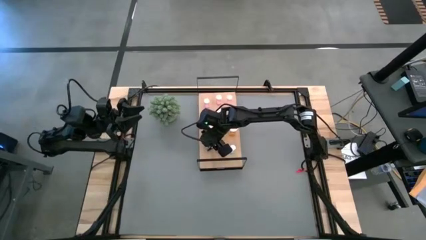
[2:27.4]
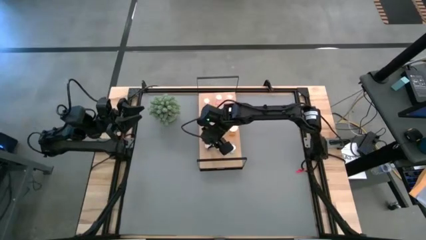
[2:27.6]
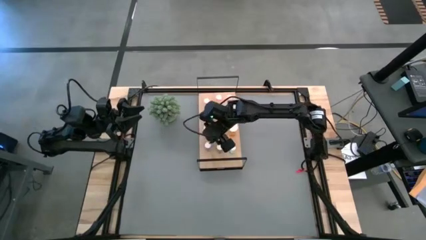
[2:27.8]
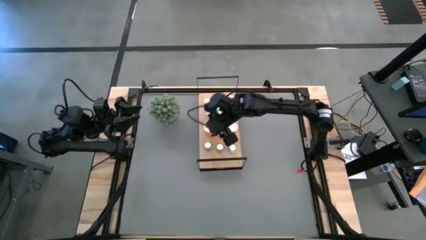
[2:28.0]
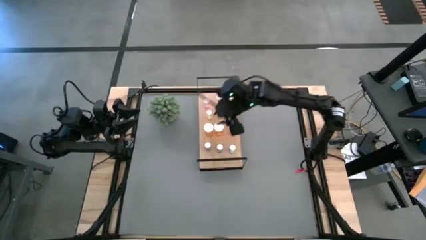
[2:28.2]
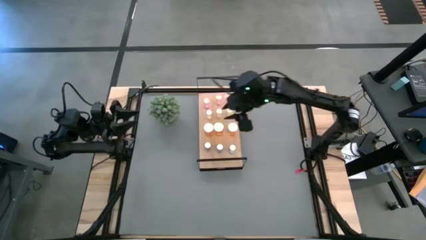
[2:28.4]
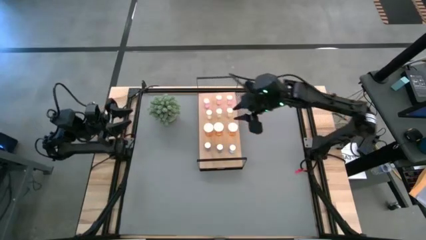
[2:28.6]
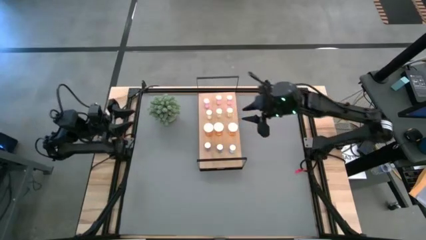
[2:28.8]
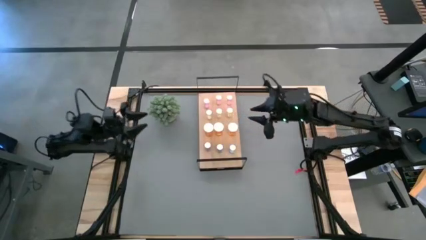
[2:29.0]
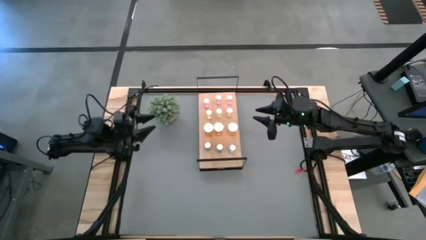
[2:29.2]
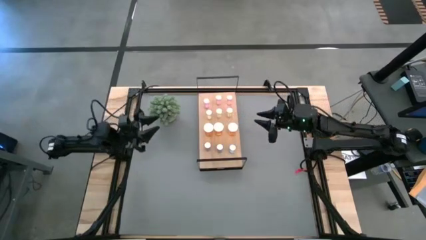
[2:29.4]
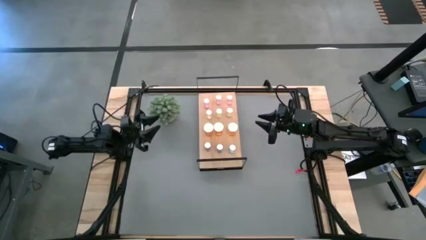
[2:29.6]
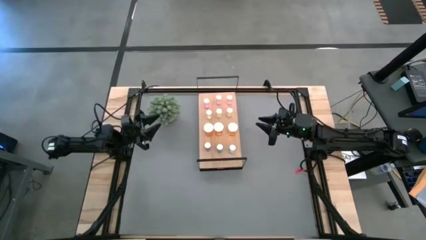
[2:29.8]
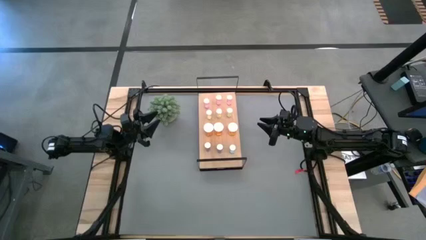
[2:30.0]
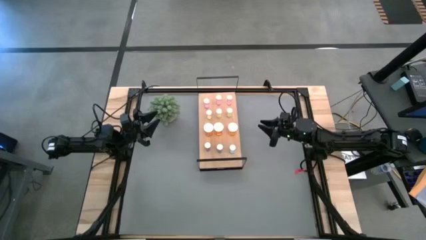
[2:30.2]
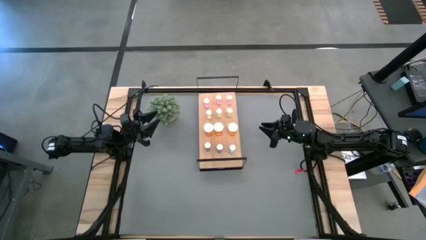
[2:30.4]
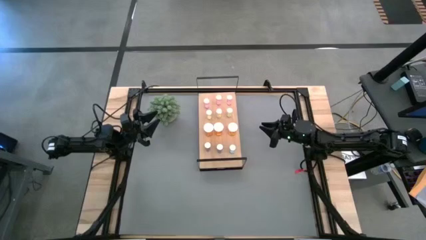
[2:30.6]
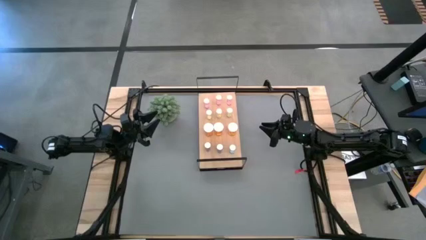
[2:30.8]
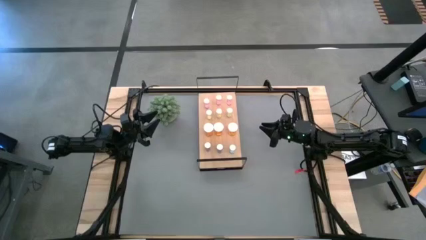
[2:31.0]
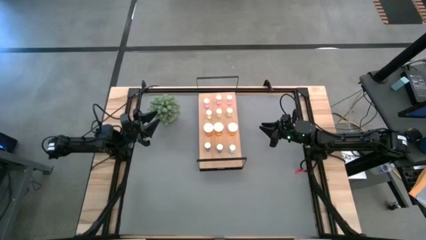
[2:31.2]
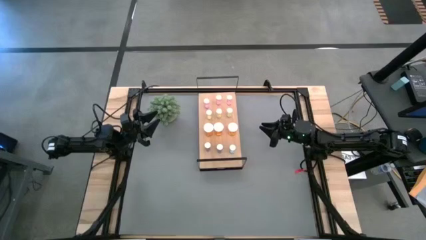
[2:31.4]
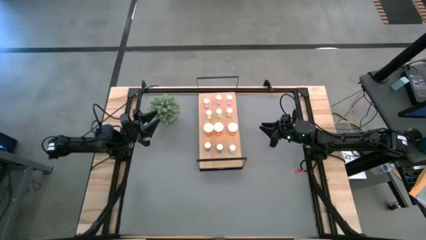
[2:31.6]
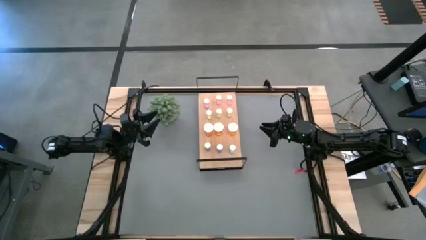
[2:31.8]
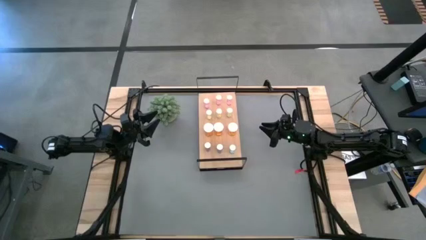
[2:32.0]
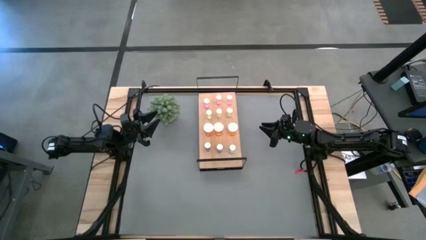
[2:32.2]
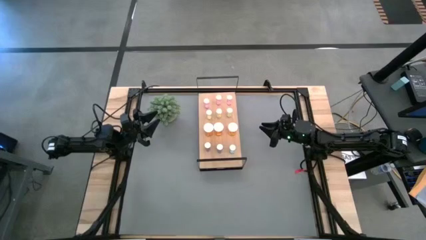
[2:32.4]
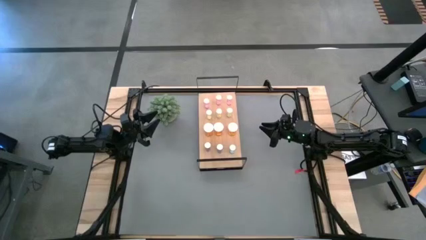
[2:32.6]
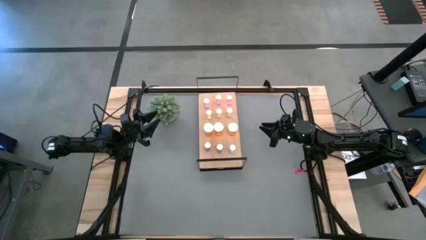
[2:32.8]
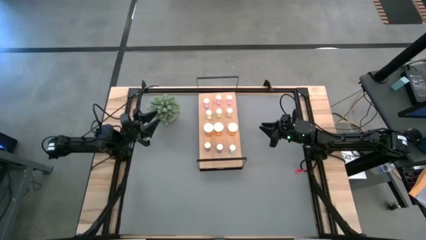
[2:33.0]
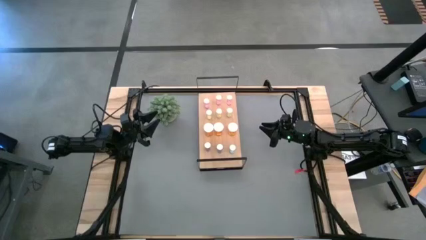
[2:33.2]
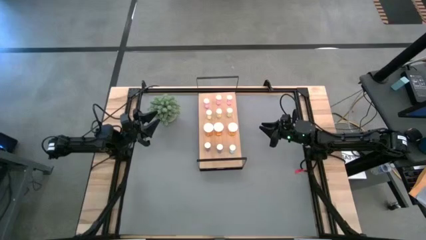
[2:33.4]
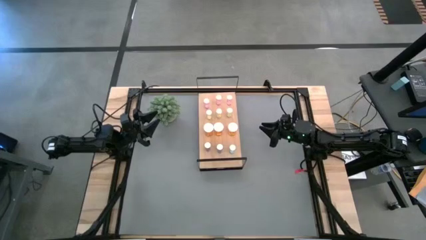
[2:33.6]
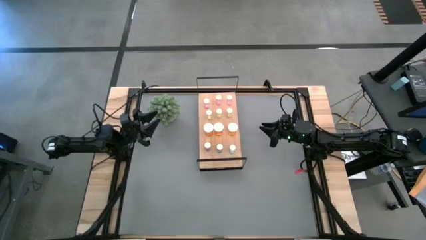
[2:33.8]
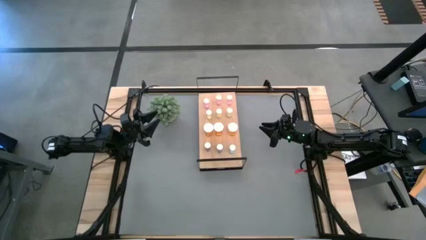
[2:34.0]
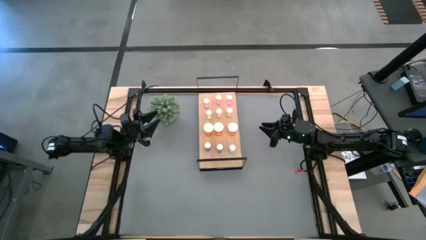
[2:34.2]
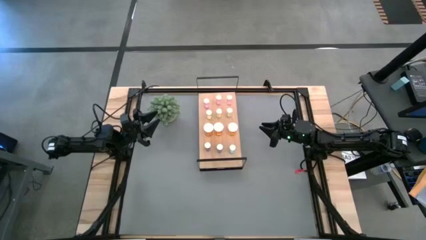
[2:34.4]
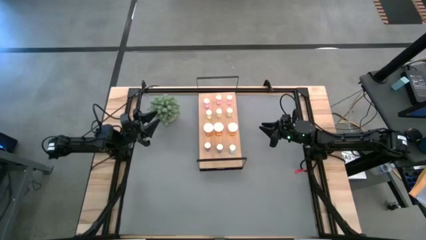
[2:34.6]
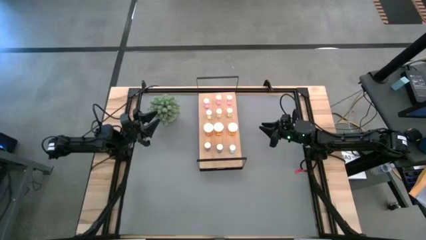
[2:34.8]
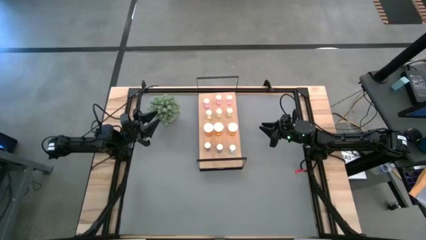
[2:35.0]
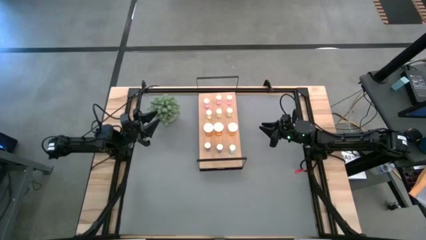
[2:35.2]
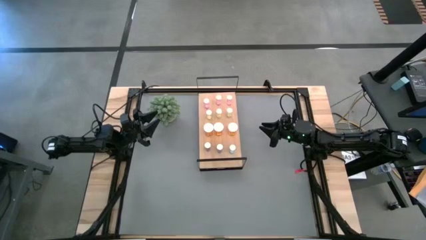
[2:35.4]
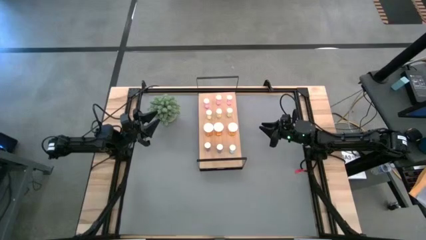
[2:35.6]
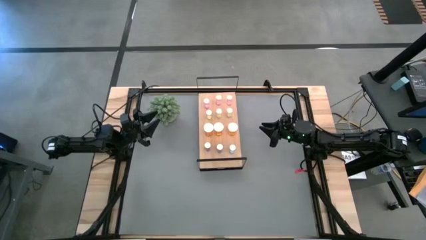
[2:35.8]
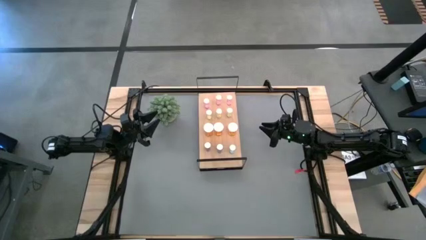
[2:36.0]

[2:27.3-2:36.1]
Task: Pick and place medicine bottles onto shelf by color
Return to Home Position

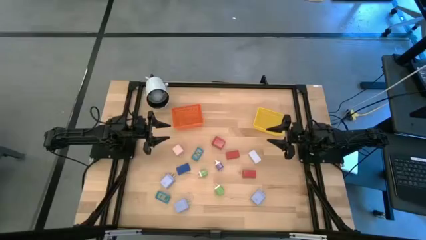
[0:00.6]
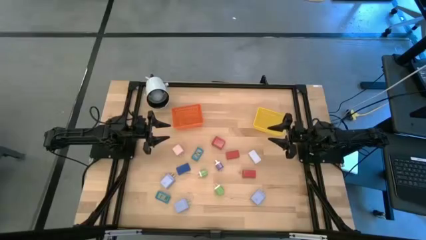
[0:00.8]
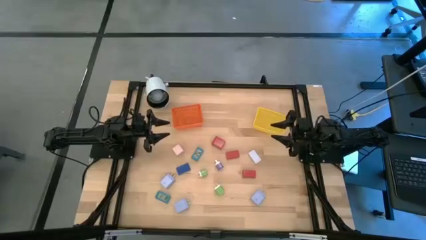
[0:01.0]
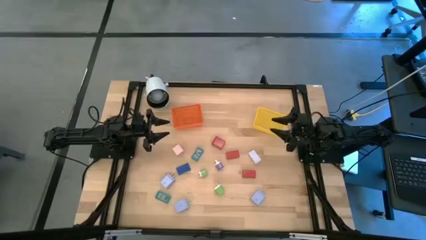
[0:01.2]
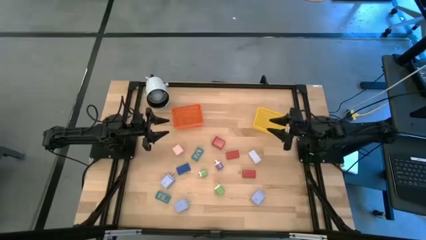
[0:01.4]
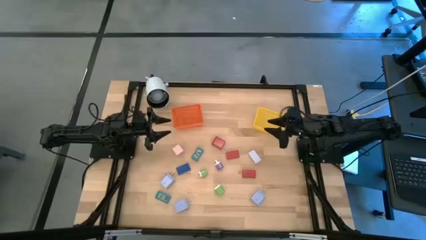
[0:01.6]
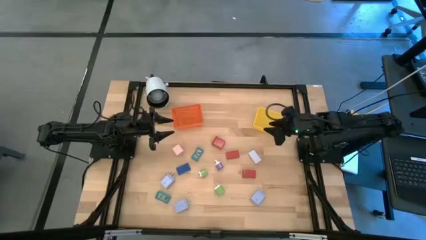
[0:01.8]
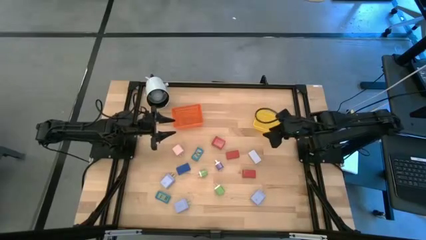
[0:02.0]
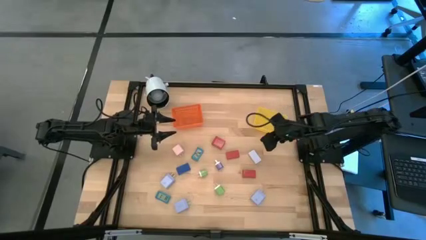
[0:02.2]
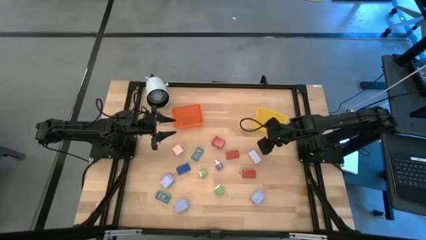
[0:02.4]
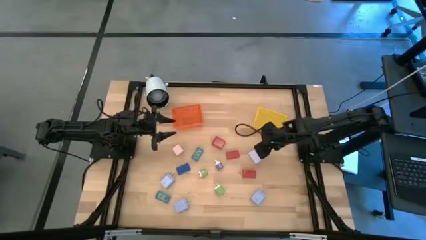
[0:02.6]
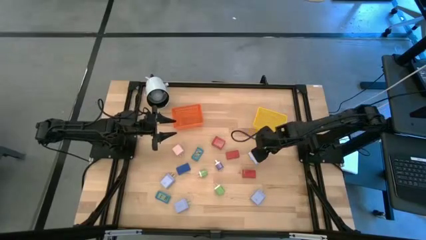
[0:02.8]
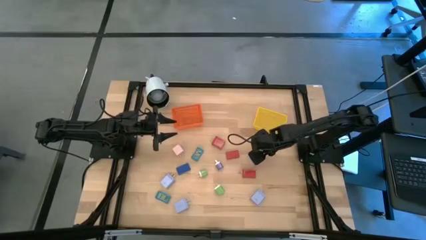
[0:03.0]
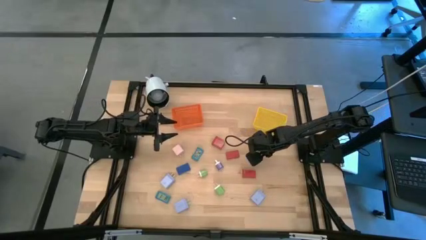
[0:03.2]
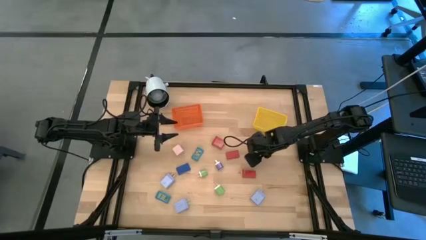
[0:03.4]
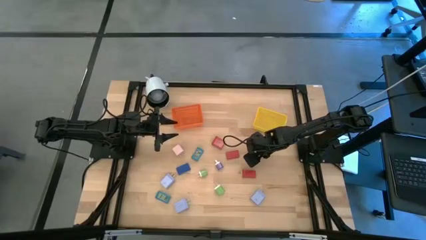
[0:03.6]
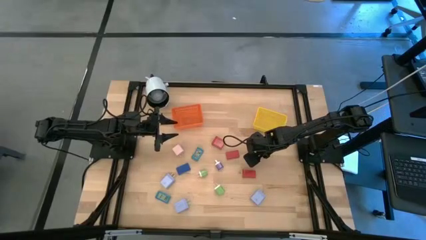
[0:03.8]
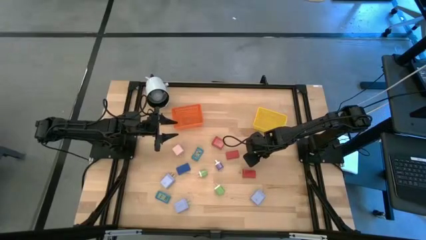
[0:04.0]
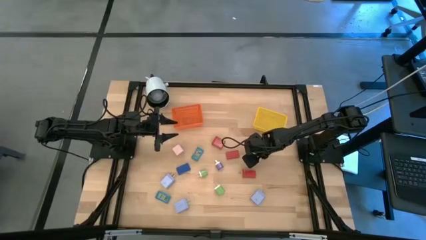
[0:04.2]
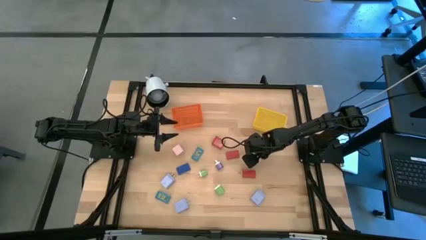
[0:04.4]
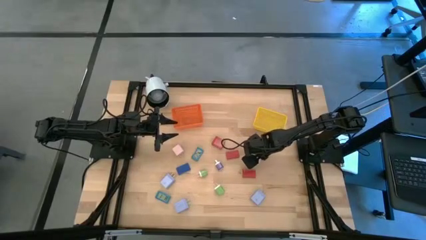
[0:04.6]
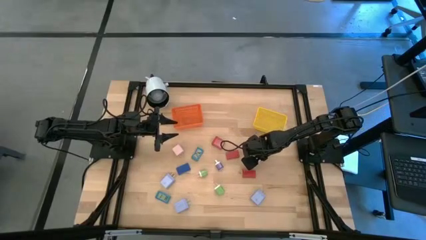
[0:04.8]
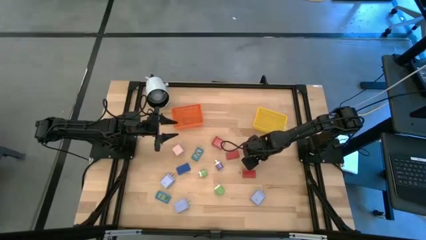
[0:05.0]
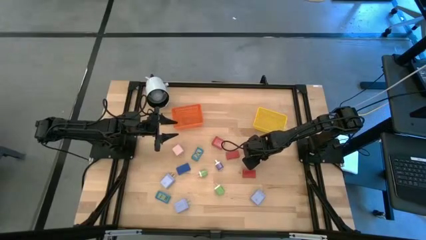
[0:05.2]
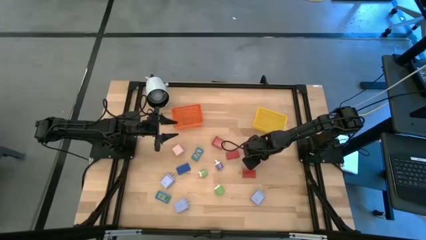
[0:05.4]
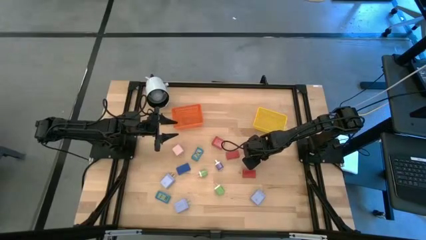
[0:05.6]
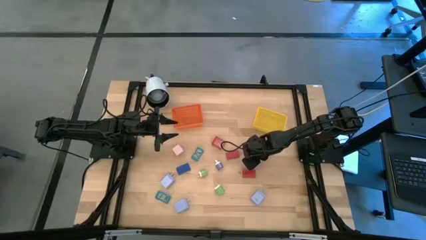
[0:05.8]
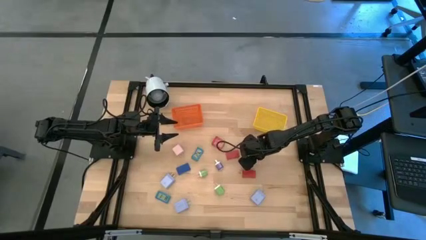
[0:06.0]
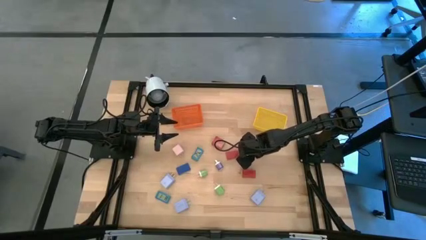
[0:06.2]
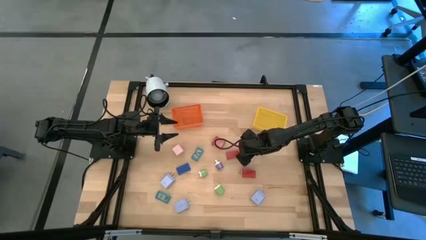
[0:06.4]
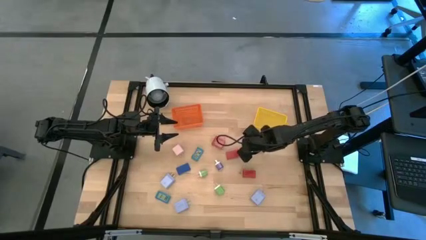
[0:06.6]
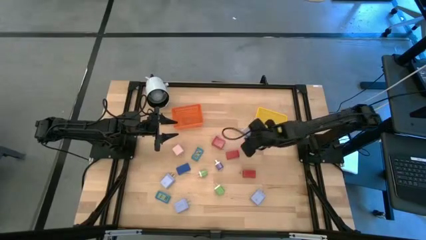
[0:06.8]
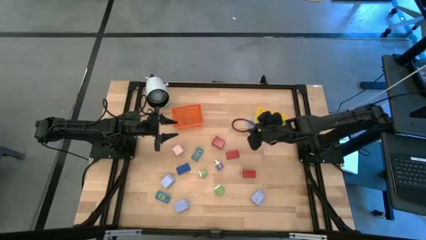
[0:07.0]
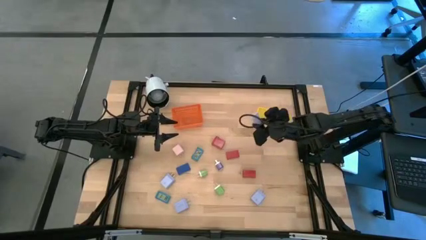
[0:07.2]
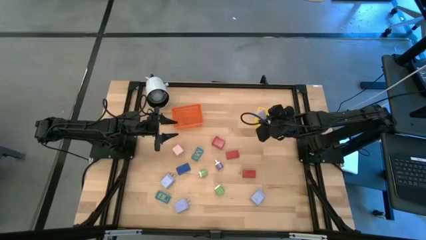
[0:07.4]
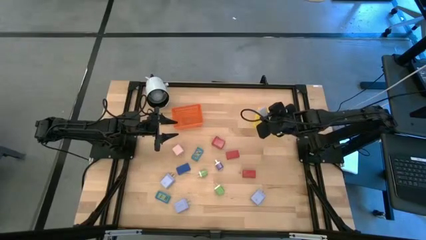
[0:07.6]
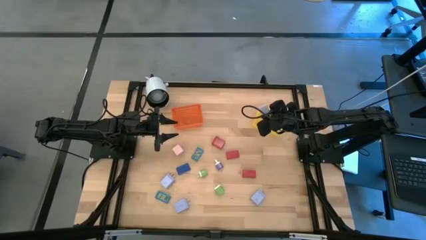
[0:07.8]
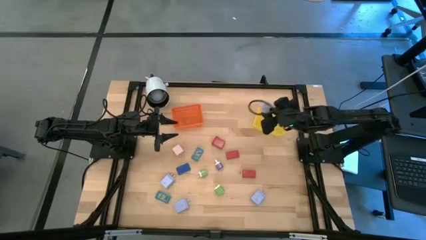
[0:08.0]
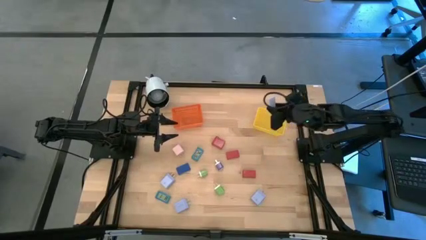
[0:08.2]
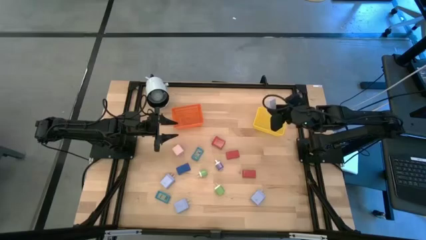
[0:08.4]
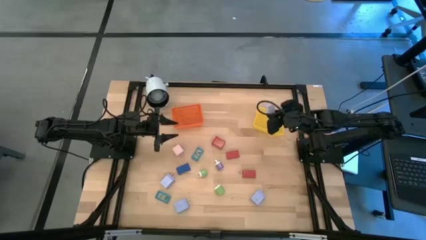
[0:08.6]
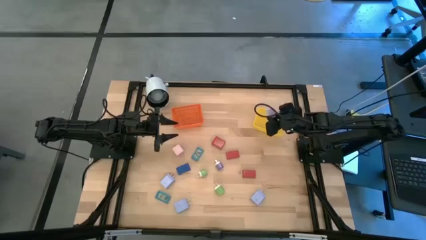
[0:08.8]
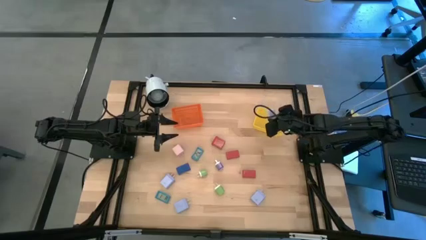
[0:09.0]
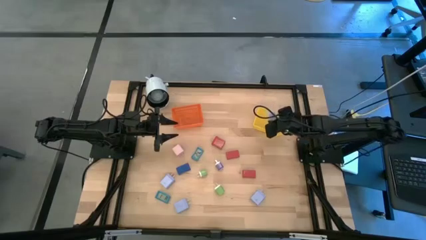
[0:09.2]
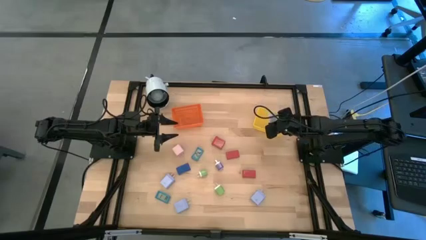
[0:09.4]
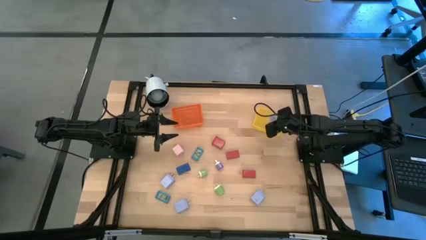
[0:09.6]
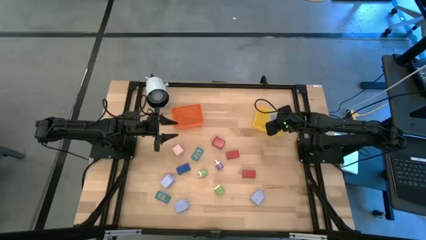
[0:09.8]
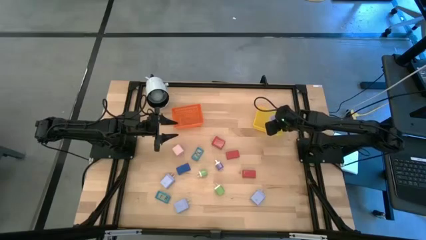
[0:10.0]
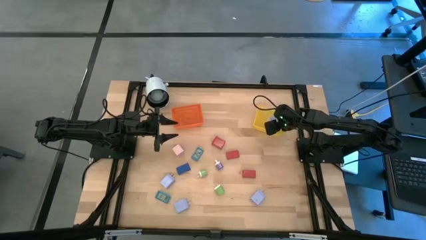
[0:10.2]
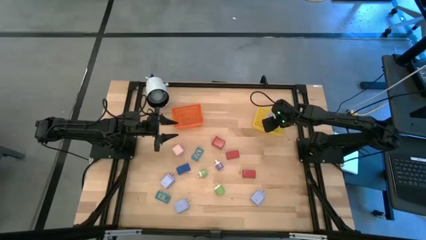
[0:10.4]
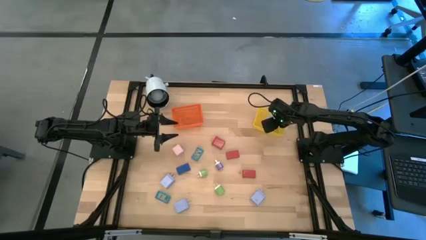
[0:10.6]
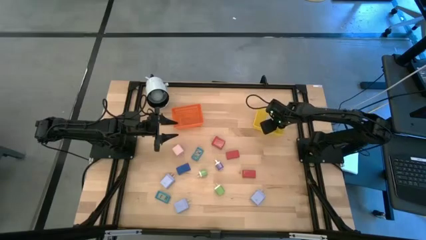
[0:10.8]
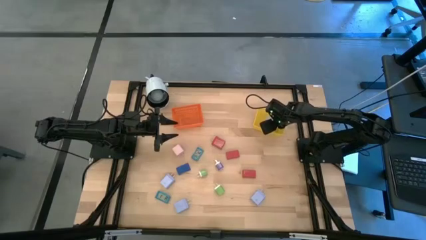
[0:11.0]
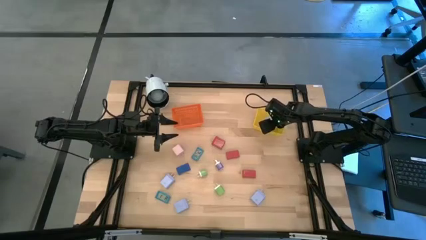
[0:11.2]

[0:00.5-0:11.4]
Task: Pick & Place Office items
Put the white digital clock into the yellow bin
